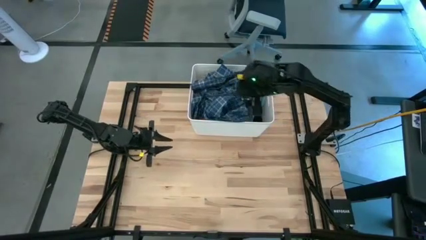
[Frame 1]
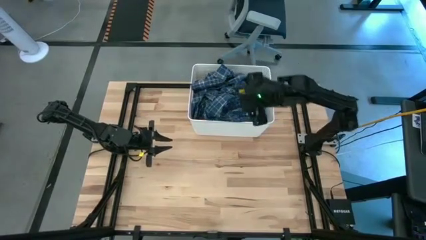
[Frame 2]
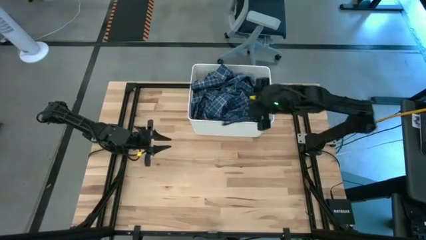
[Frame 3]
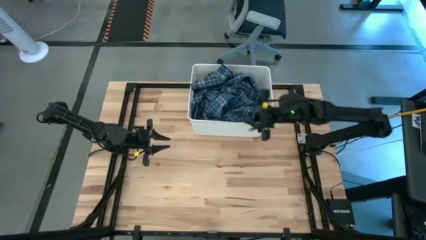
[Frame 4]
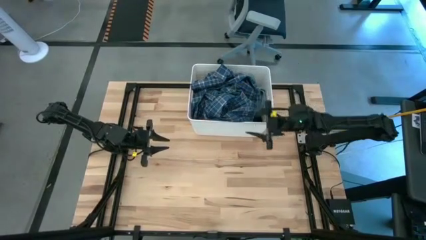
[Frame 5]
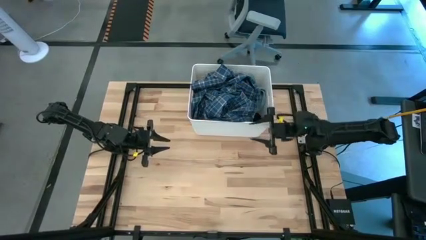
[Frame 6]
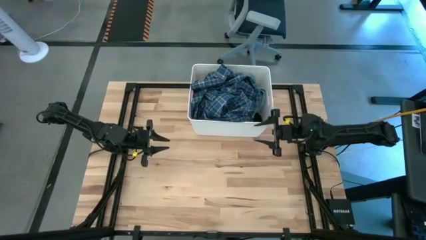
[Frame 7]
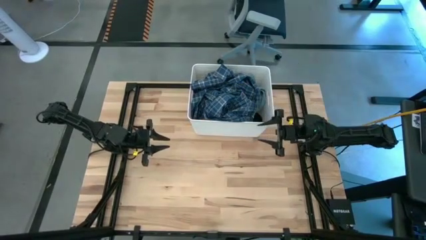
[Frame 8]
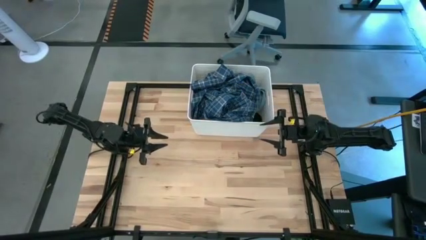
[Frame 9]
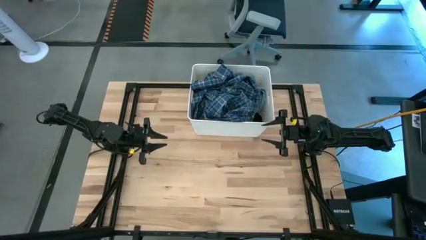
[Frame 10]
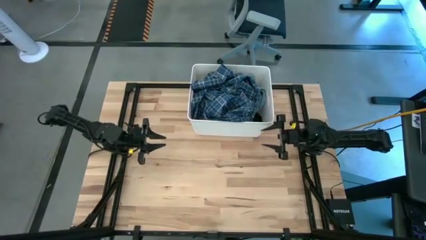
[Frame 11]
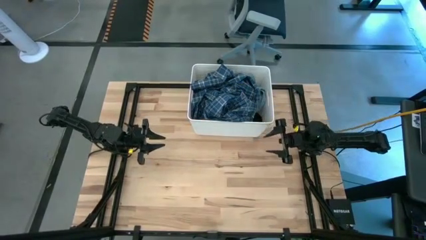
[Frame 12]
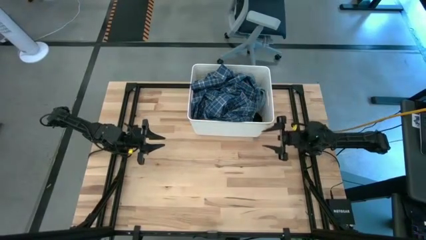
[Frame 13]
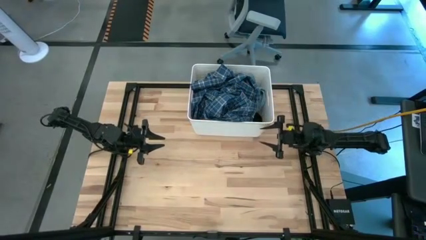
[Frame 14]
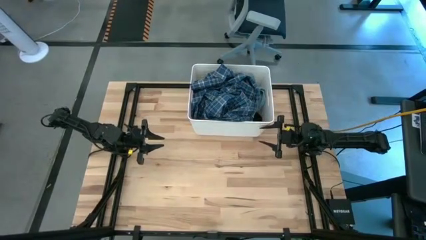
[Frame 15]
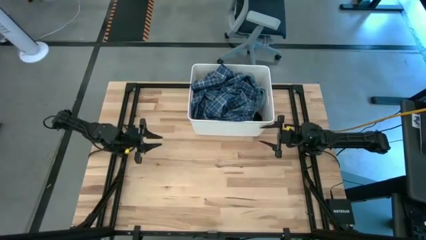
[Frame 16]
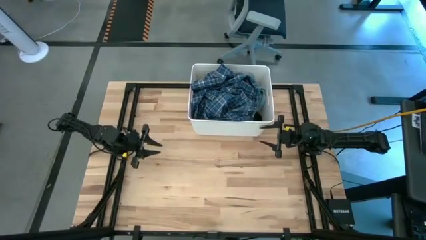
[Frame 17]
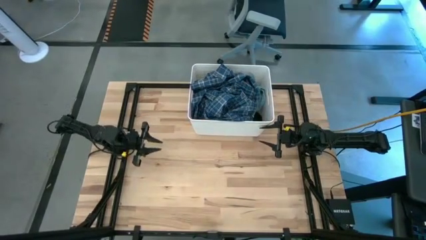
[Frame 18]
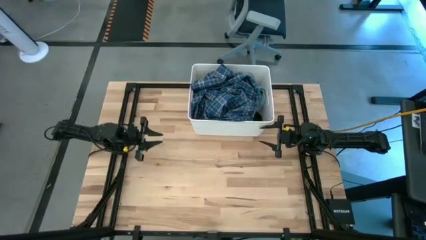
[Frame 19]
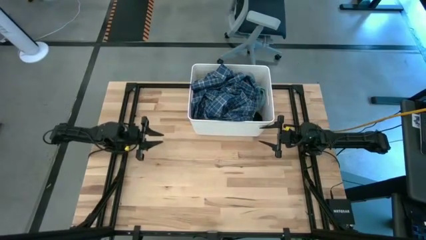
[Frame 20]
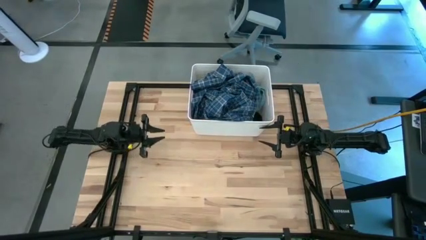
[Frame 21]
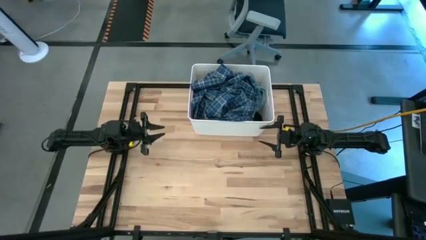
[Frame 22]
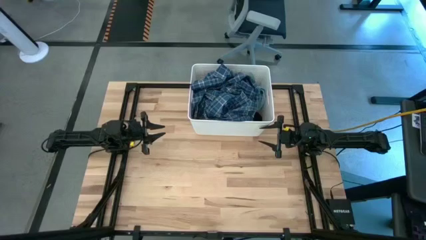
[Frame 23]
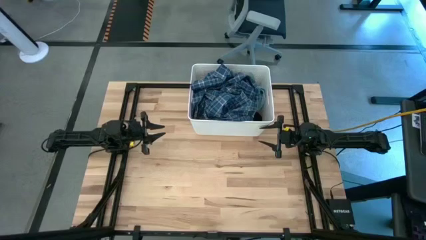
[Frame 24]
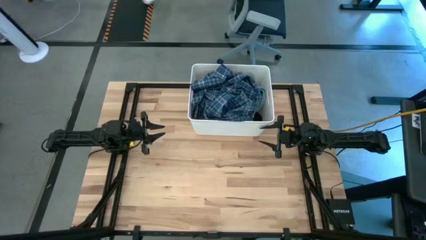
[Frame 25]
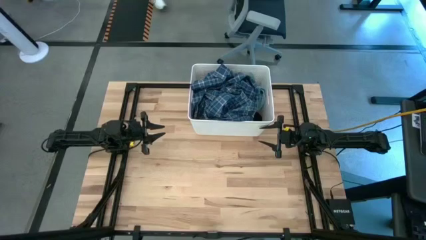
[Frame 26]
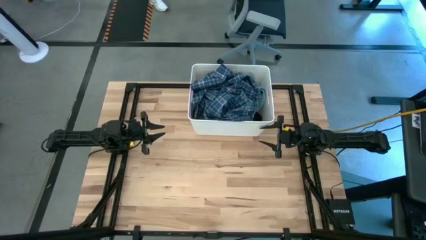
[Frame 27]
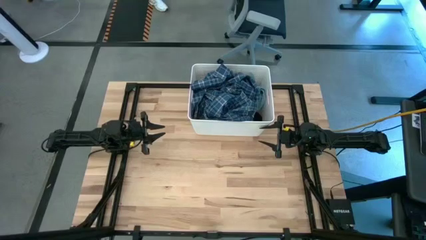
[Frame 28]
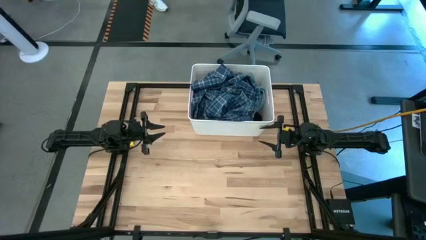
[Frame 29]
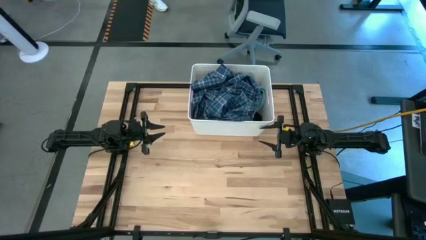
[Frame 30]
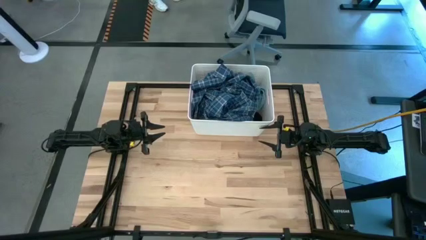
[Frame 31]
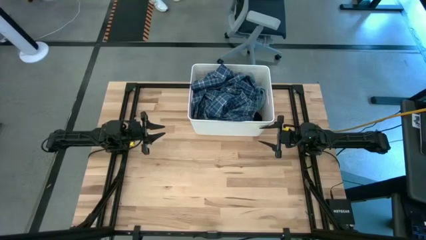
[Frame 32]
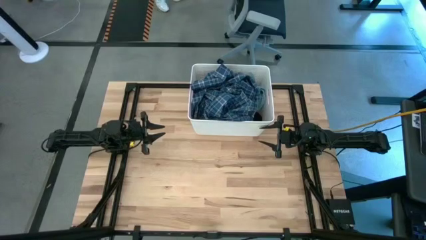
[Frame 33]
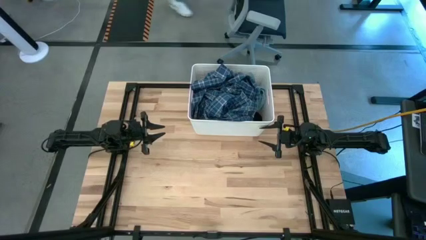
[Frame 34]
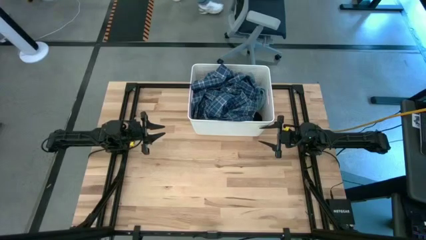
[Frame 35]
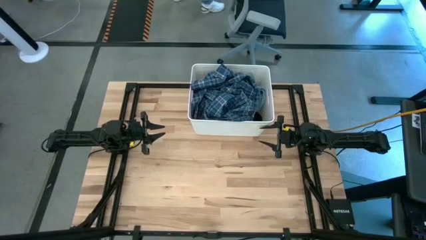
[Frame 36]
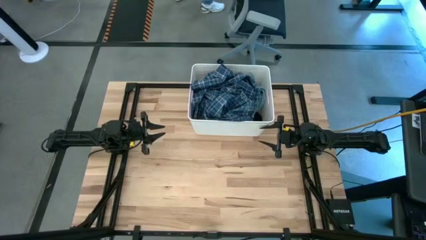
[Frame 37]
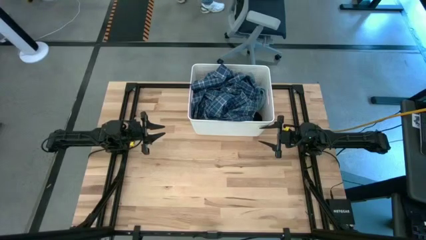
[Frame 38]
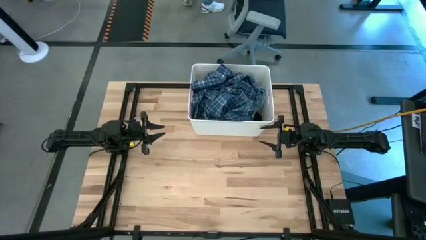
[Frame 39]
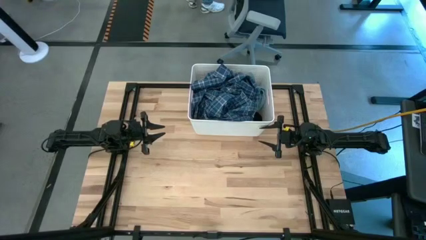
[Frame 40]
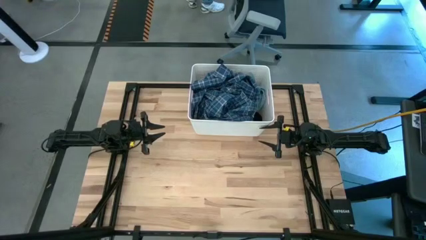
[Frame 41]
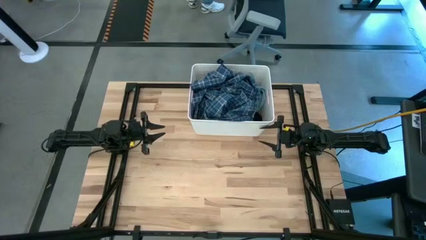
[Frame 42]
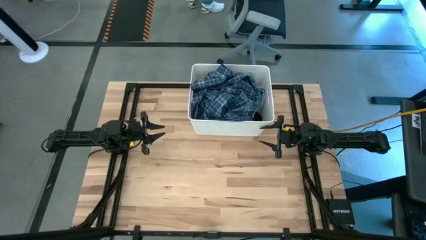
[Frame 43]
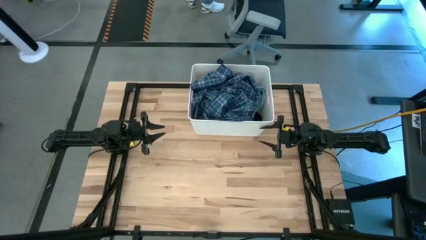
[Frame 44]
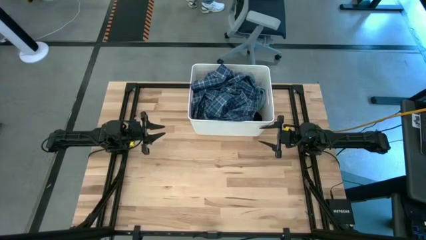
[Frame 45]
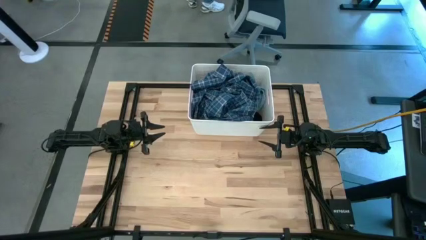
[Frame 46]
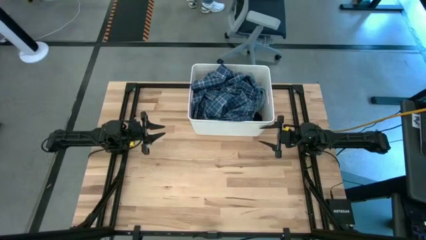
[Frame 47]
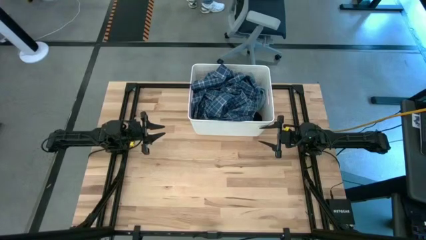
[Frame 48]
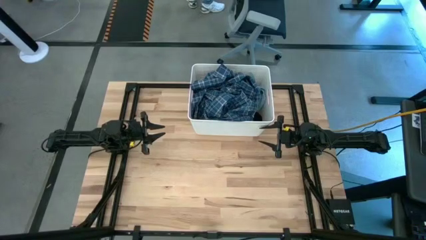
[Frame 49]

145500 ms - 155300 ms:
Task: Sort clothes
Return to Home Position

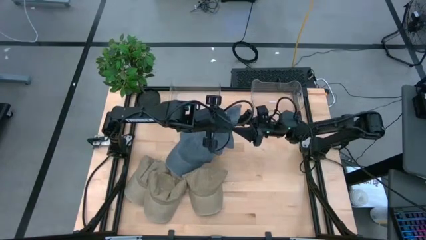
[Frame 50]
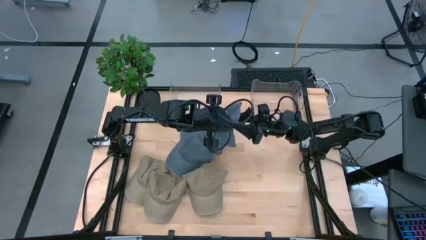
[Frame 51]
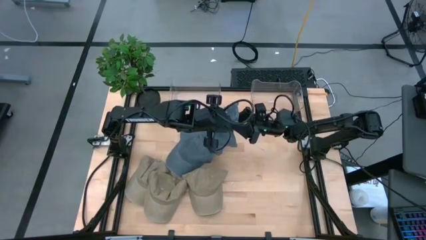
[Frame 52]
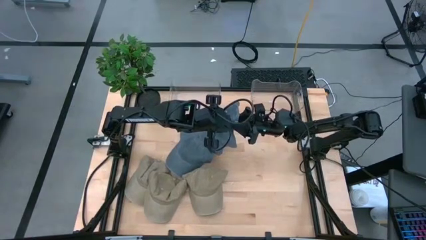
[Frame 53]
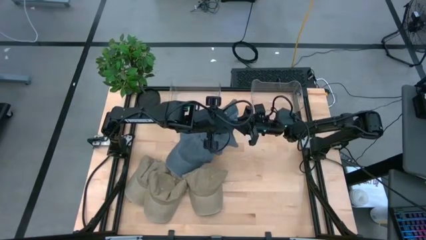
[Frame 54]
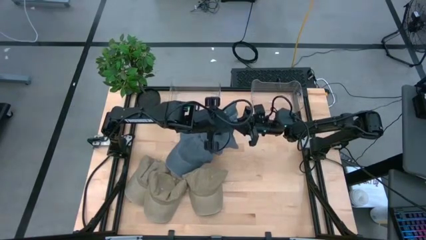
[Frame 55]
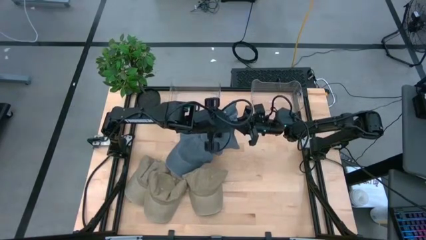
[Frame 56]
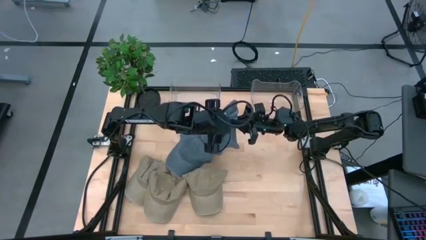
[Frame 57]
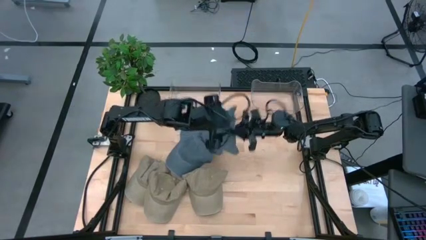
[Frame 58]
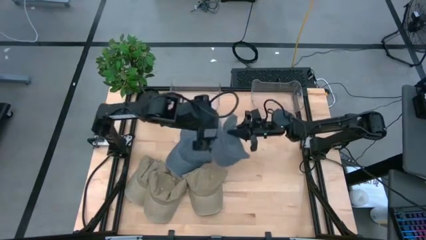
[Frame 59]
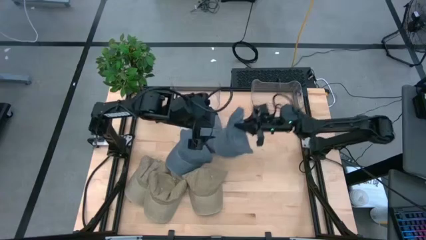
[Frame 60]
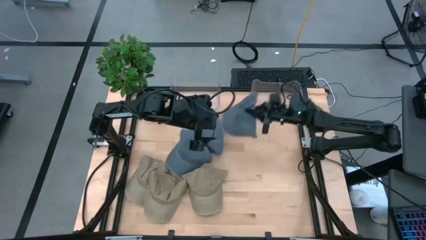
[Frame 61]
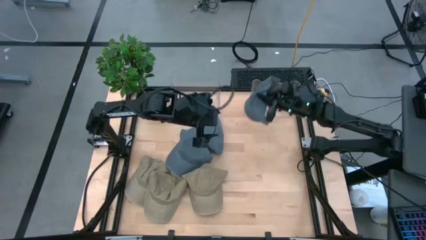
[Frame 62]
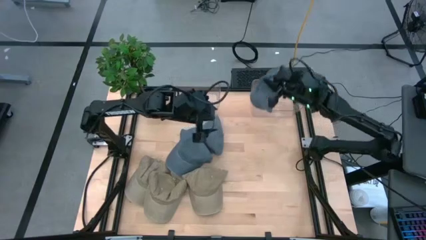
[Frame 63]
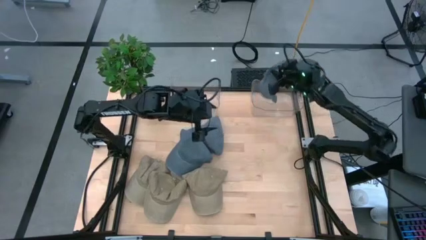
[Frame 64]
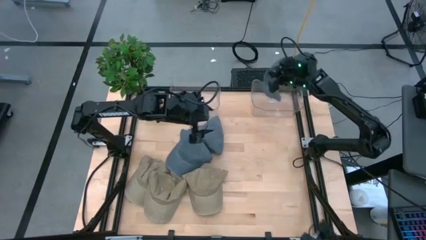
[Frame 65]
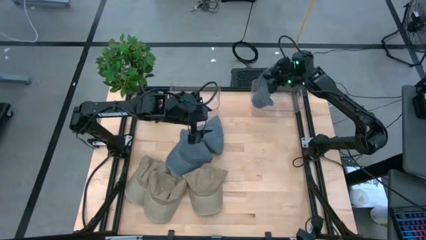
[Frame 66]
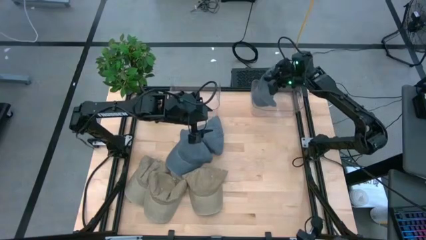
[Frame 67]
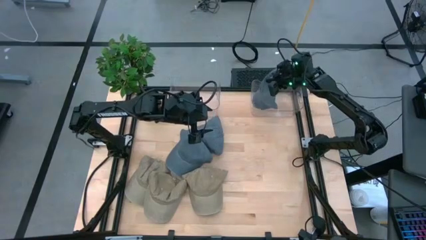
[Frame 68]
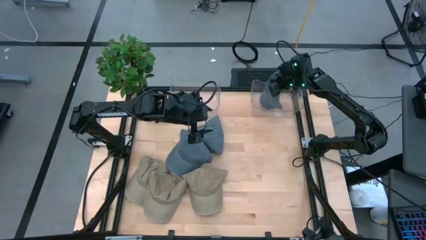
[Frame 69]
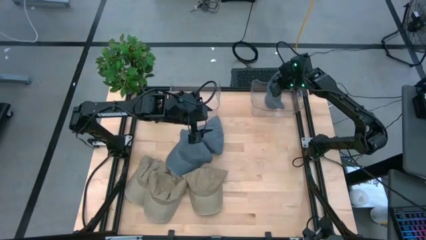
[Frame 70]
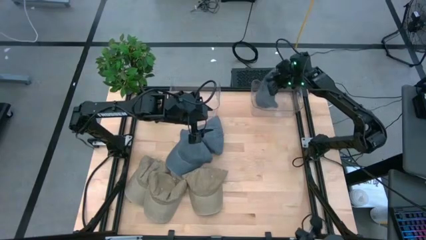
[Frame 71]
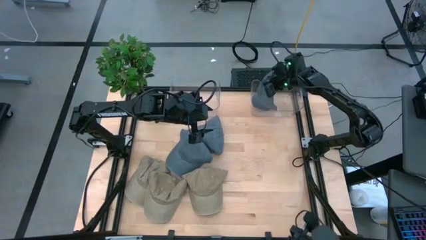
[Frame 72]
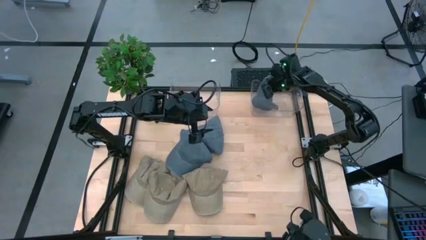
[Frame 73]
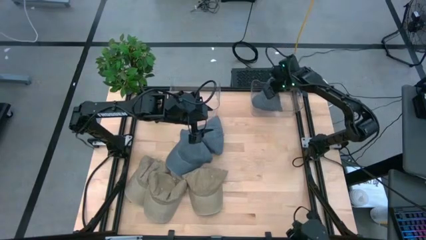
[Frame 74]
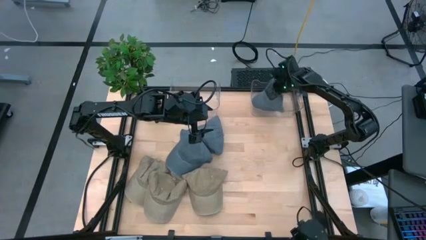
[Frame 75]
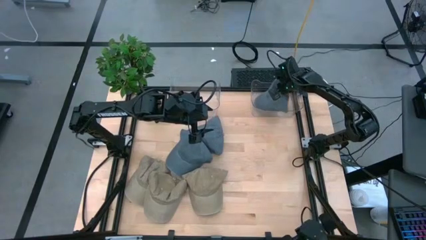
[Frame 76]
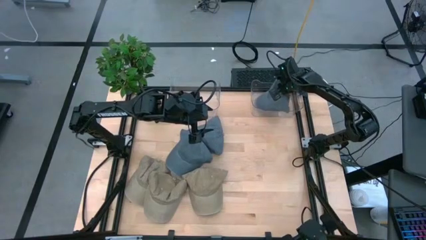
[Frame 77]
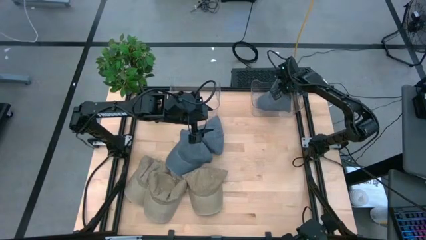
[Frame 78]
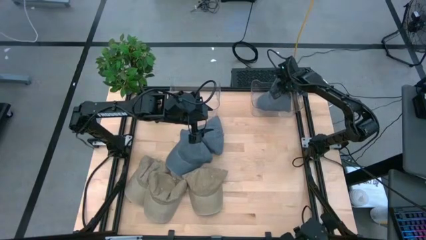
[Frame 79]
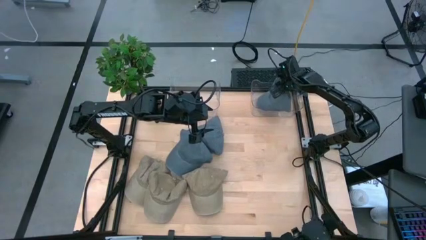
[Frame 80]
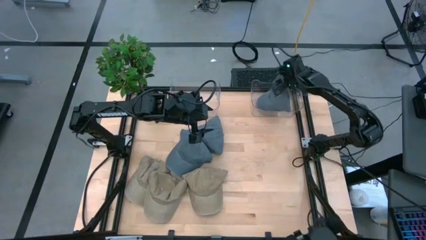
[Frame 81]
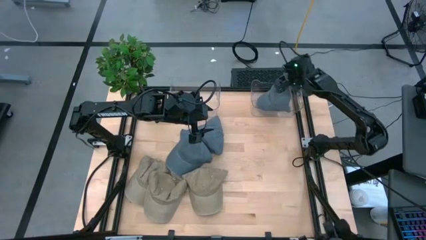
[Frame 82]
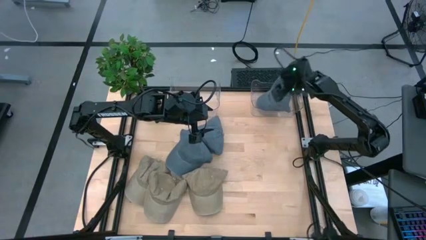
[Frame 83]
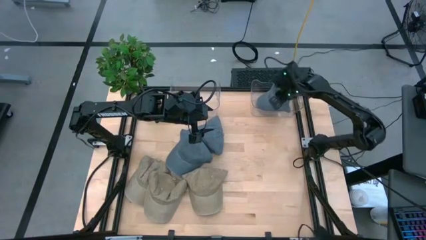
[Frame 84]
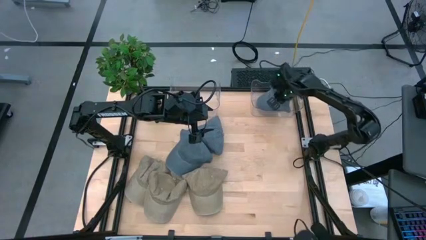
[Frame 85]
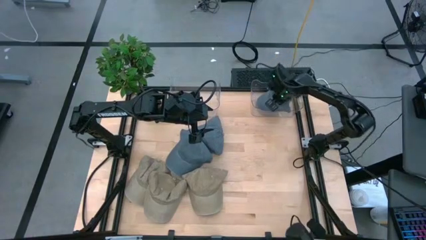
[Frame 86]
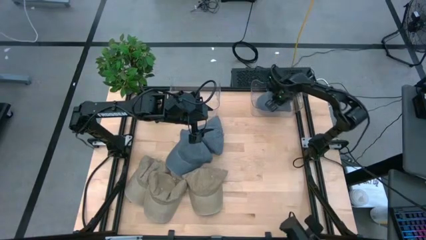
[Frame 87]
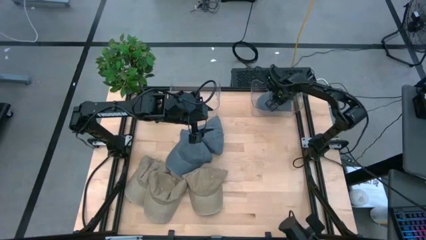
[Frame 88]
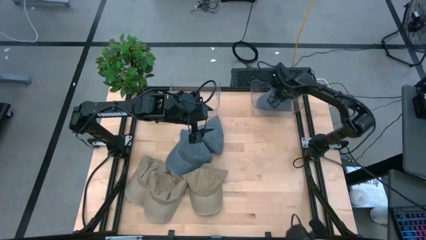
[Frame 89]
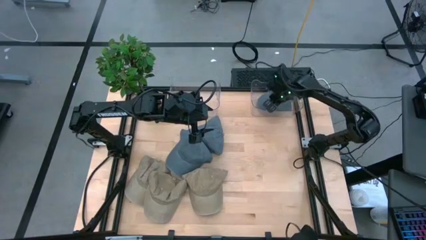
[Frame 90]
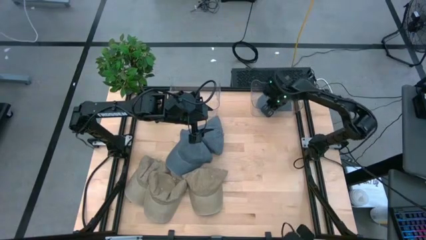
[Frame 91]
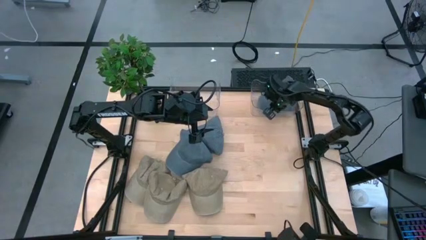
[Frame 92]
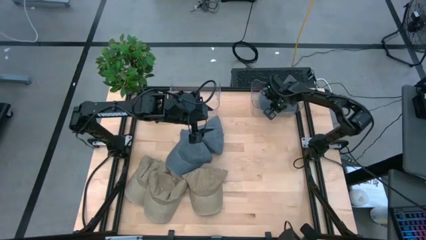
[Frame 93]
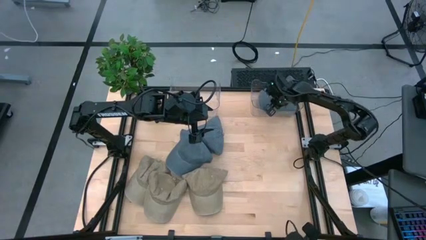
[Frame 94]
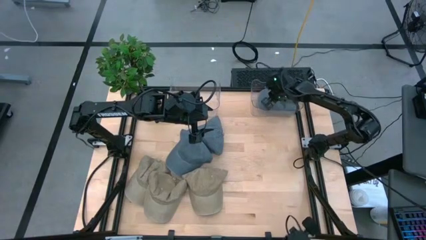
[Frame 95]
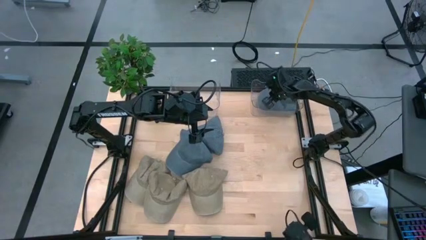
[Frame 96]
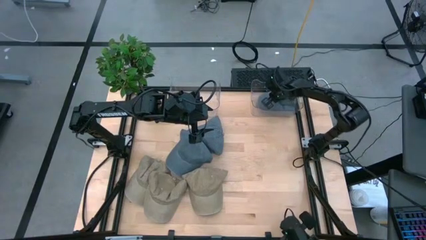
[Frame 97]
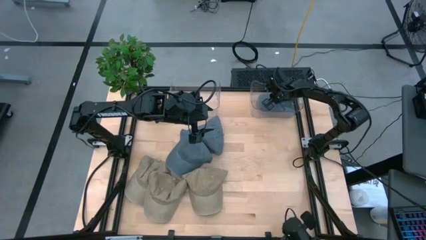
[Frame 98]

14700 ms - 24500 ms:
Task: Pick & Place hat
Put the left blue cap into the right transparent bin
